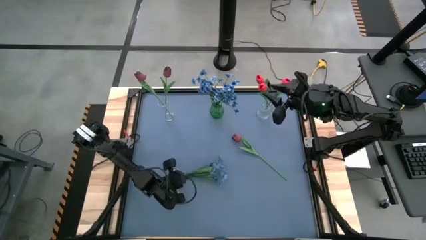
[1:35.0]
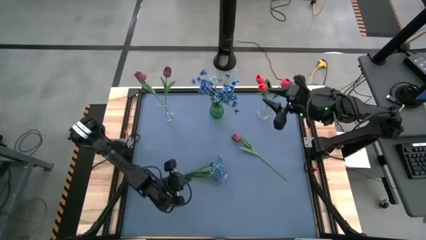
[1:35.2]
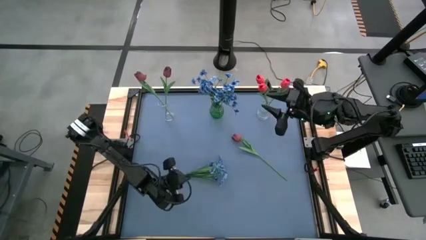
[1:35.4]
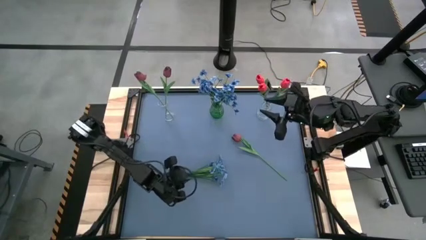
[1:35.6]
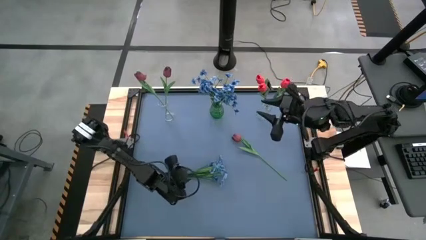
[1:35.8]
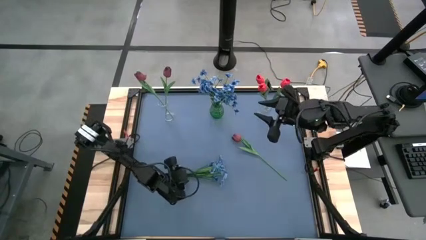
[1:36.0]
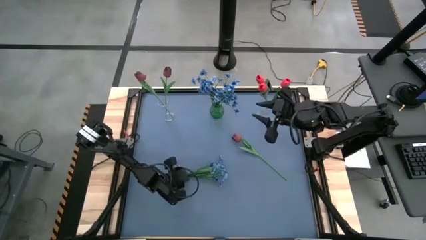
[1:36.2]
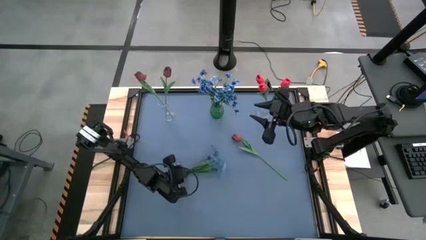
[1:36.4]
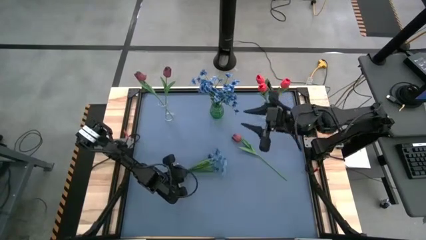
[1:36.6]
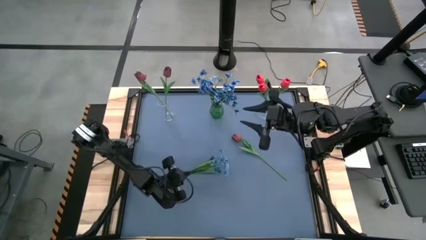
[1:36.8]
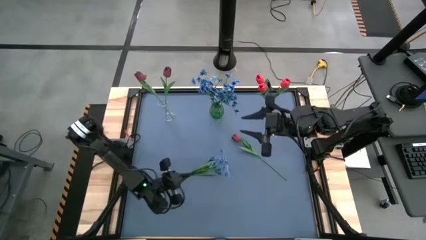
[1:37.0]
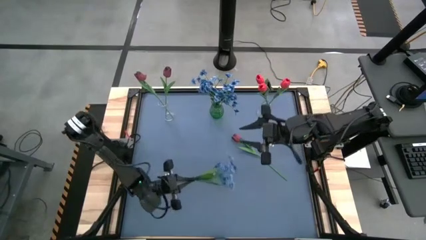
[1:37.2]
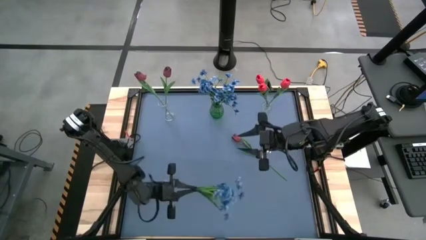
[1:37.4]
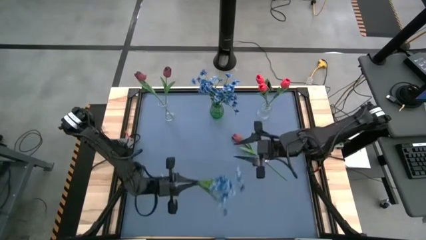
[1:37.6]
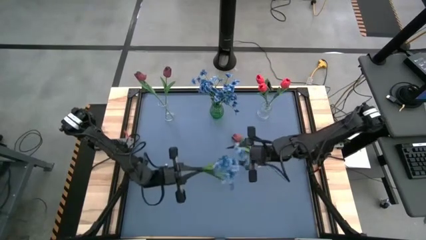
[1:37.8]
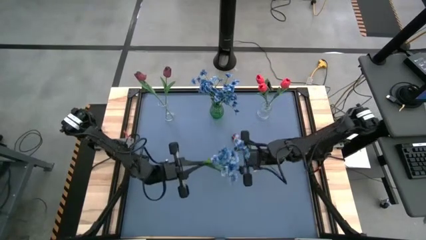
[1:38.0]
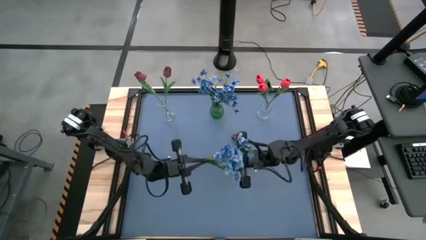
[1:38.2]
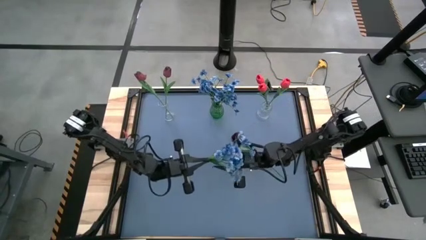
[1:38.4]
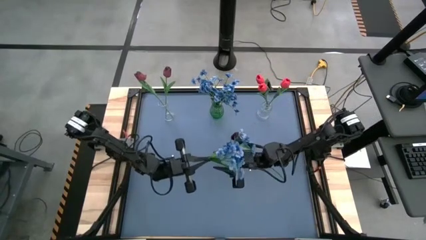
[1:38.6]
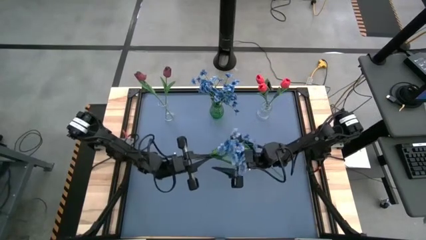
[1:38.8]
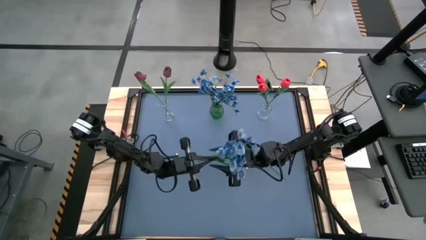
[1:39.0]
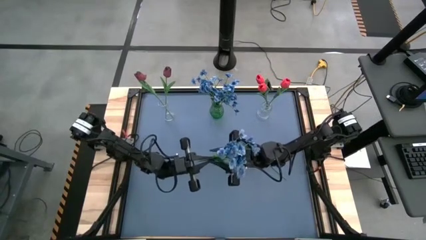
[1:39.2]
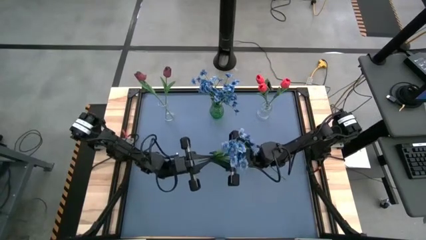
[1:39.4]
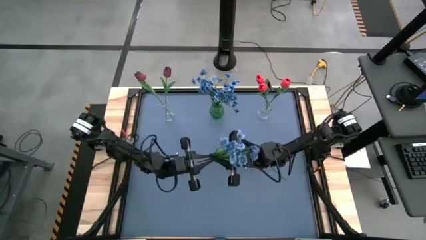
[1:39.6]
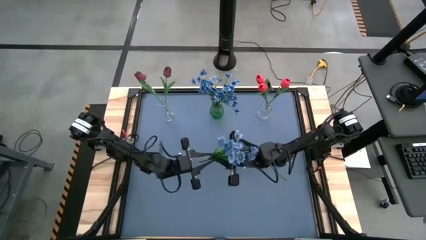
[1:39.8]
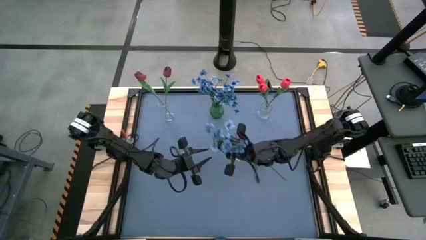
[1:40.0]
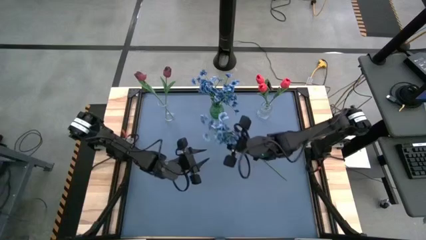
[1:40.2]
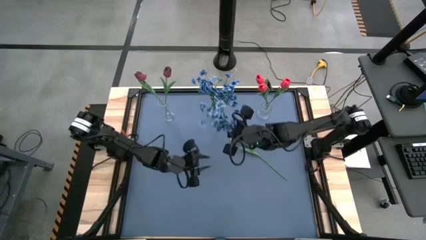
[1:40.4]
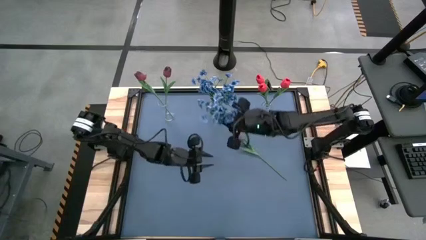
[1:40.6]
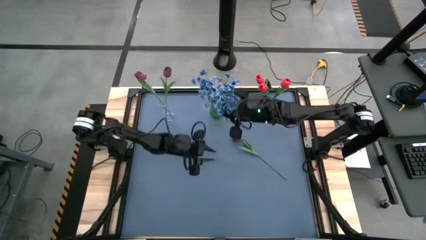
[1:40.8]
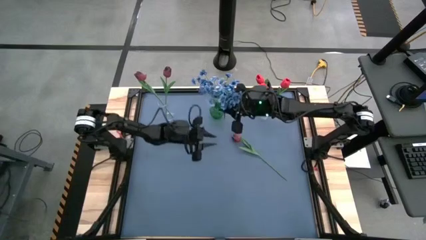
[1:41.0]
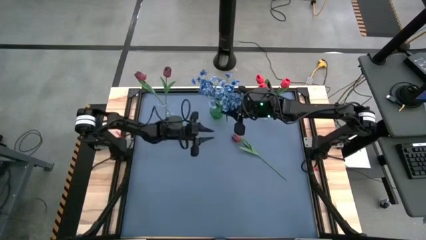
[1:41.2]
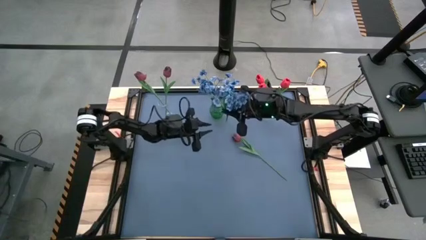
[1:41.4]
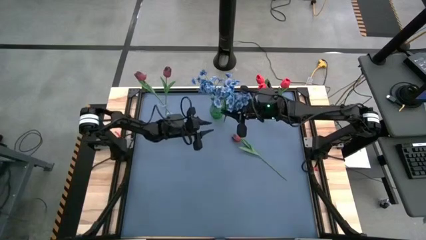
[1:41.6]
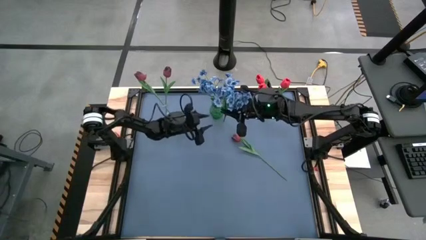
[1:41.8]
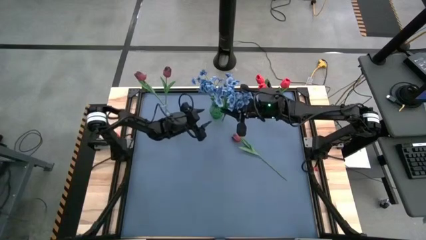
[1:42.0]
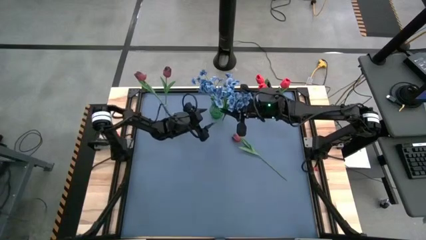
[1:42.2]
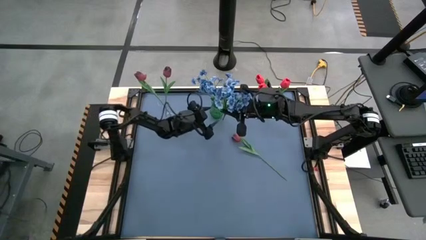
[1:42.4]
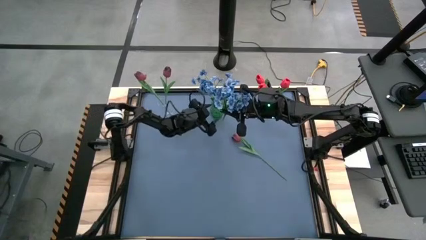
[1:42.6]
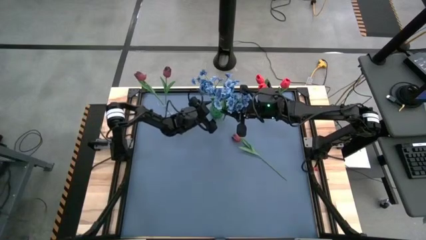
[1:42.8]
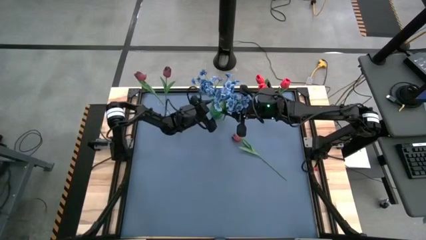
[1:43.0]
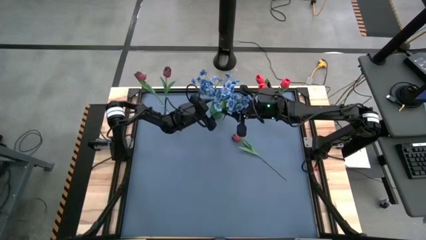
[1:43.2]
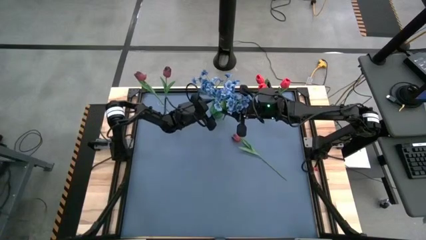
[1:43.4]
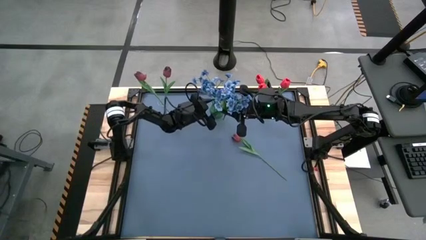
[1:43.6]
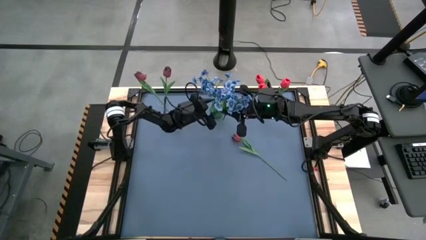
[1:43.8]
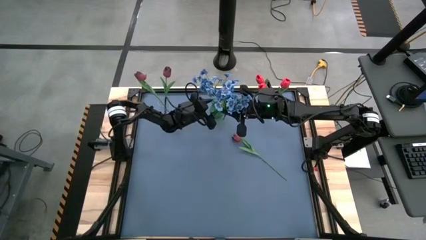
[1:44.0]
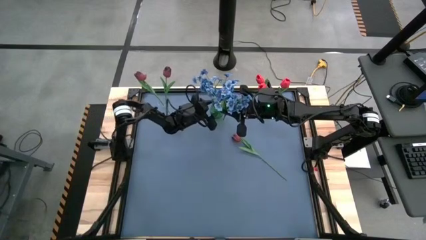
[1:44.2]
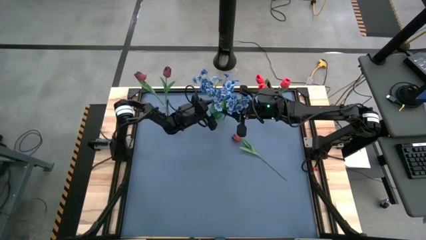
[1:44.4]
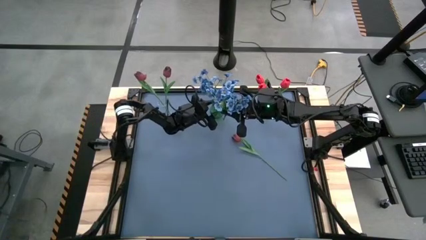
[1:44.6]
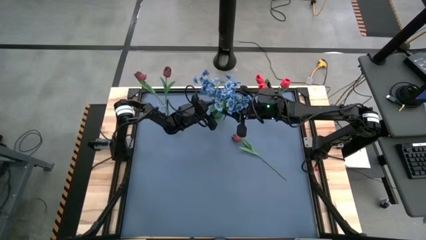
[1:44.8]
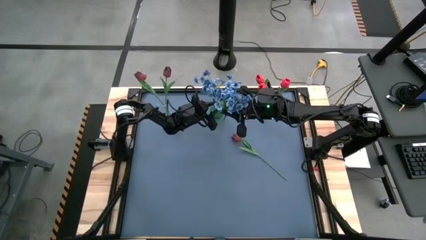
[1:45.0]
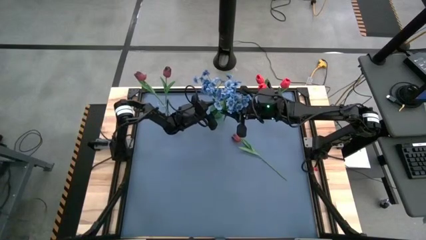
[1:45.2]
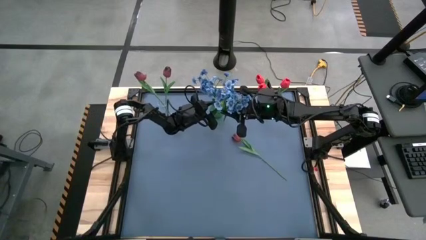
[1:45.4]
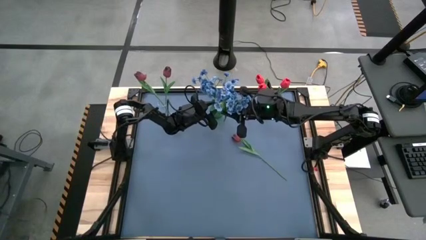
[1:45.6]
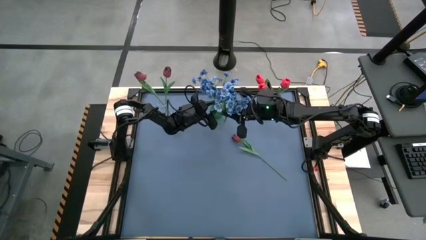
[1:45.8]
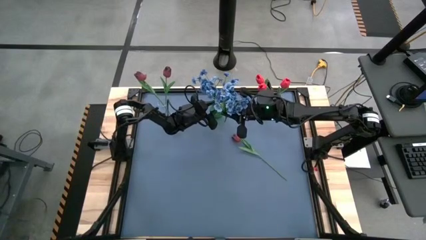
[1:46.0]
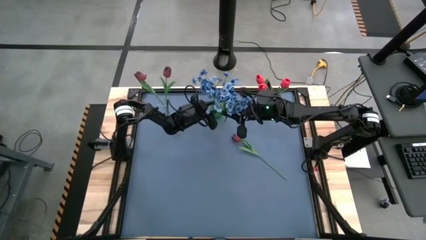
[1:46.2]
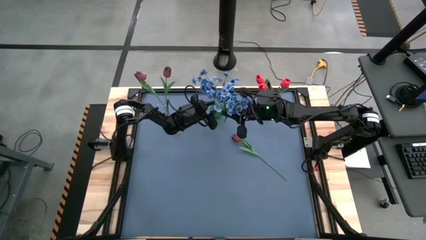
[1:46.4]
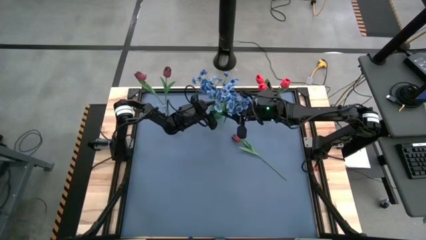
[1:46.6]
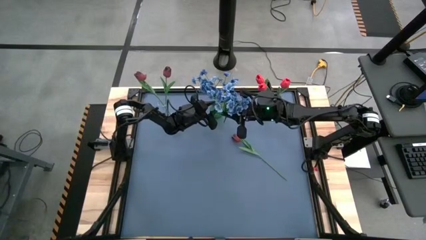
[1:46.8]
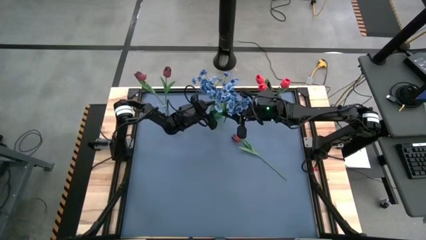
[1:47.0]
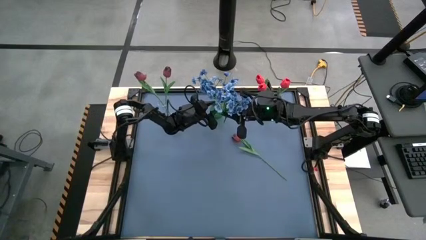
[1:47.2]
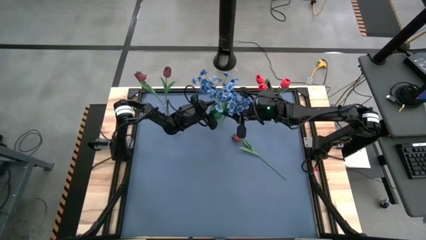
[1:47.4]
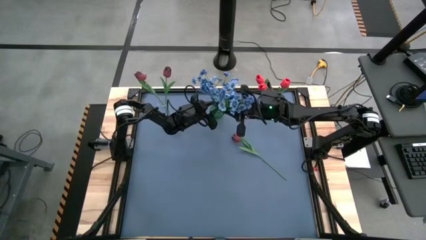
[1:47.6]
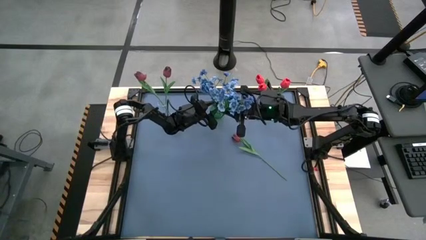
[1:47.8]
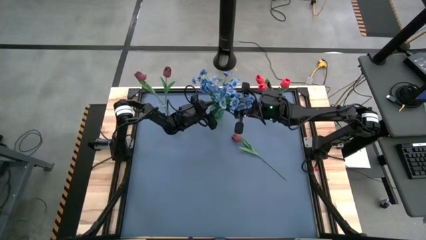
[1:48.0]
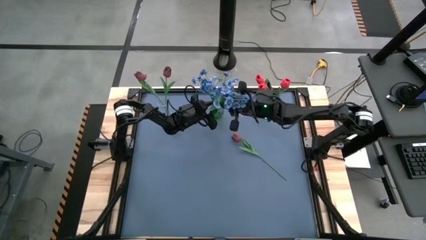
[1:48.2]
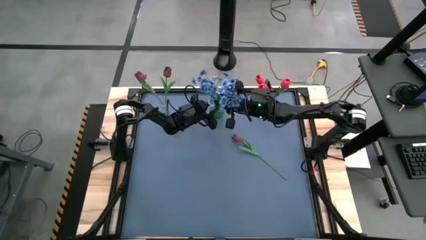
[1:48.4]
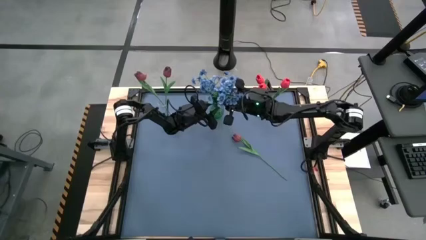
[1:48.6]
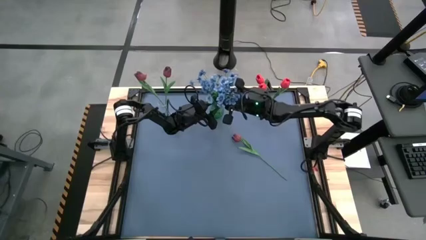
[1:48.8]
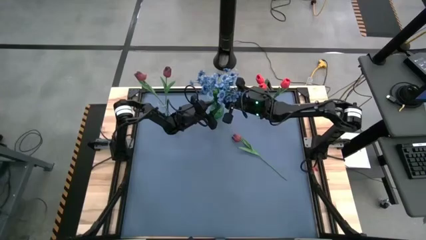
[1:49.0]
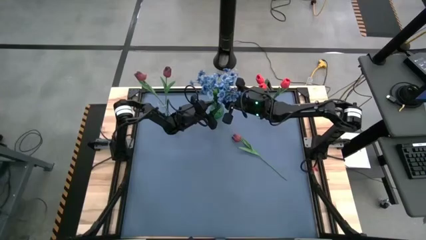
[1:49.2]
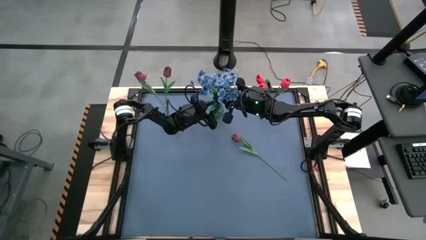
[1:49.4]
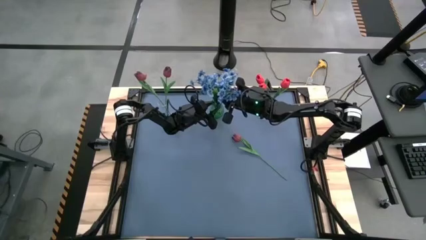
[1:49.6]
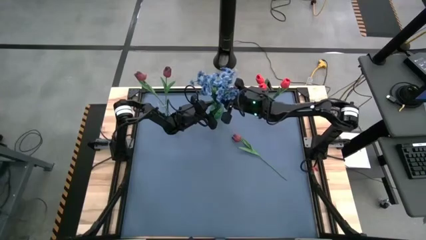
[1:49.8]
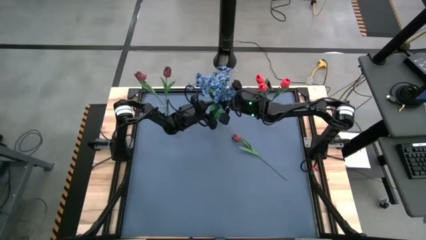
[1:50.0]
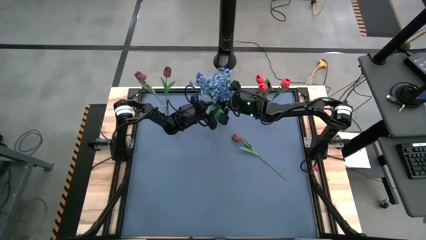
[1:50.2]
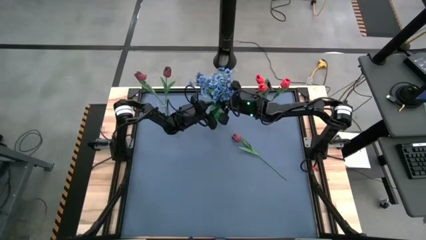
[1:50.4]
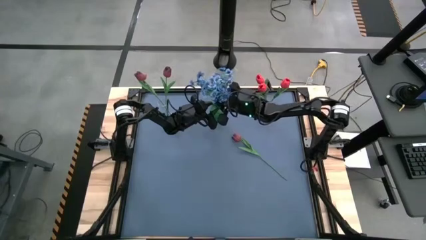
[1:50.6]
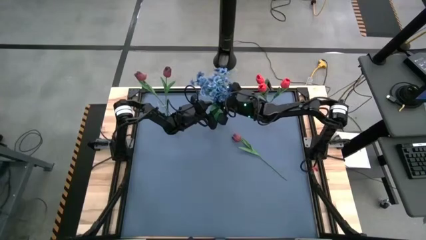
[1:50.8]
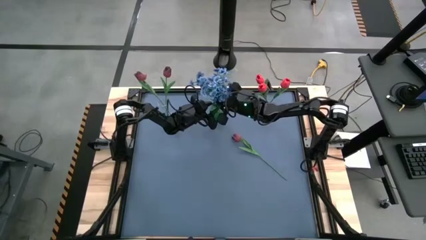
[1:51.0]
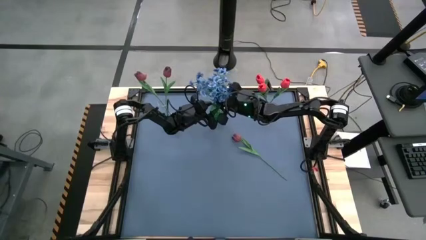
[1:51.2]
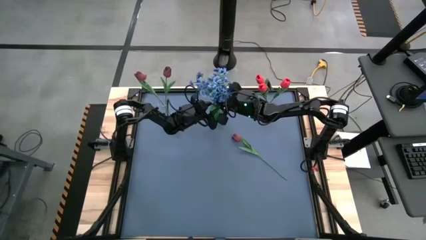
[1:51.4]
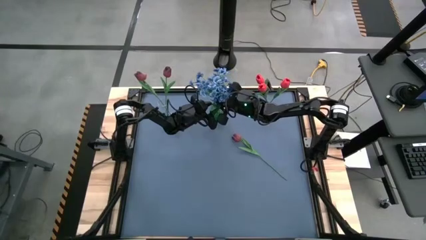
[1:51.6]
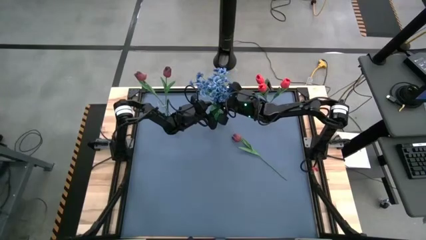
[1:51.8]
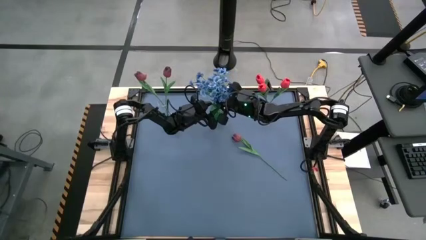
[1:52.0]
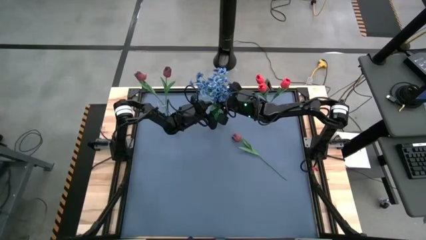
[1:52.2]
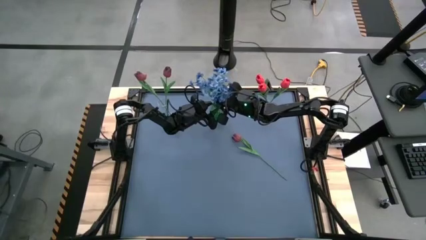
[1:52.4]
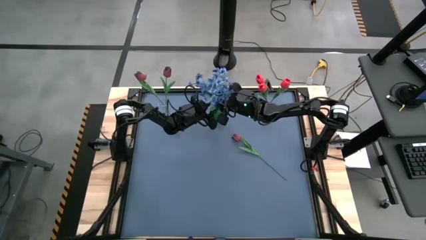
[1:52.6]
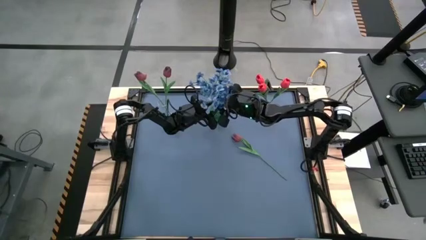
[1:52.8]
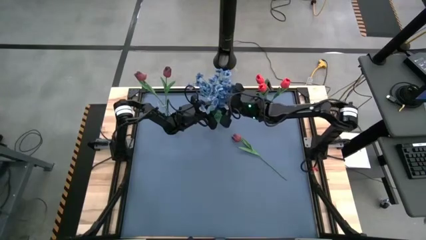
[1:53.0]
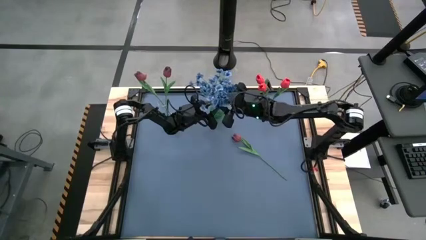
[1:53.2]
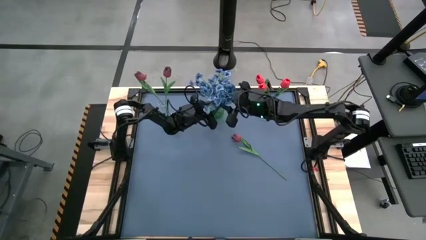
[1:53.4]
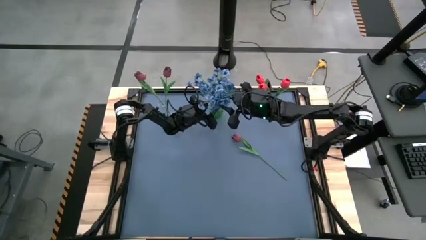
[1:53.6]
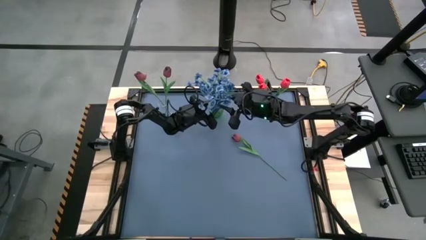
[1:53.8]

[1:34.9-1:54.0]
Task: Sort flowers into vase by color
Put the blue flower into the green vase
